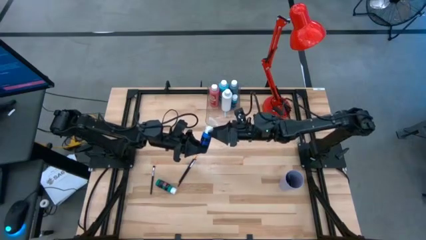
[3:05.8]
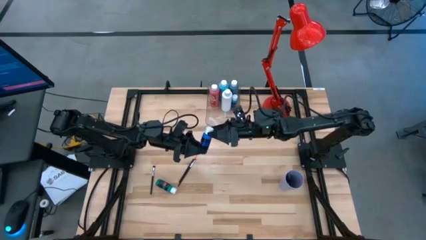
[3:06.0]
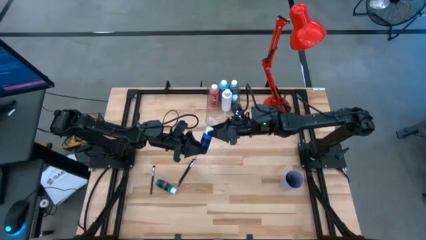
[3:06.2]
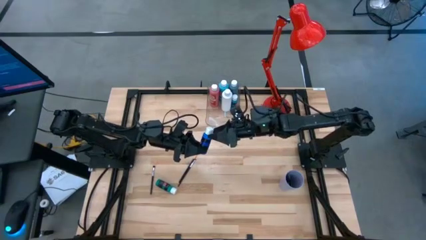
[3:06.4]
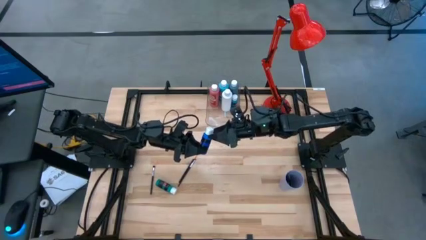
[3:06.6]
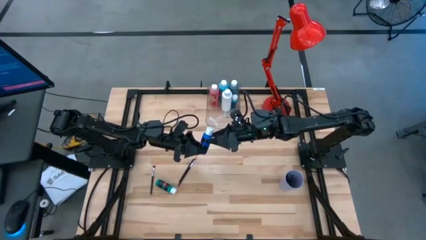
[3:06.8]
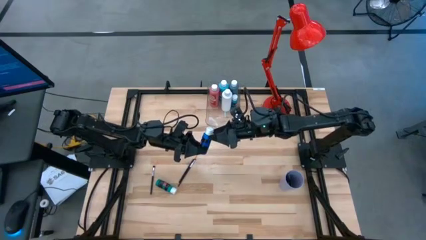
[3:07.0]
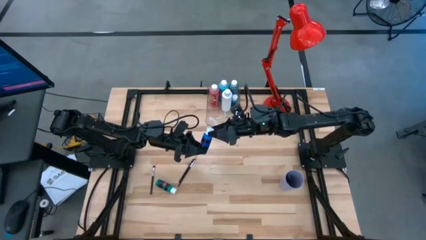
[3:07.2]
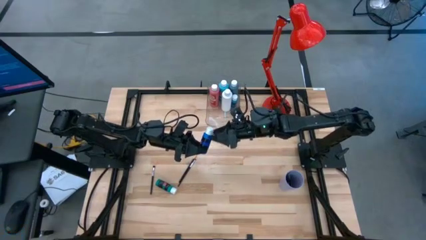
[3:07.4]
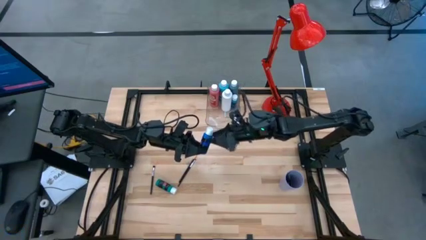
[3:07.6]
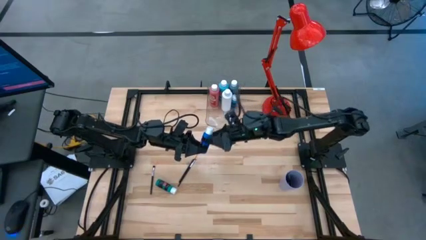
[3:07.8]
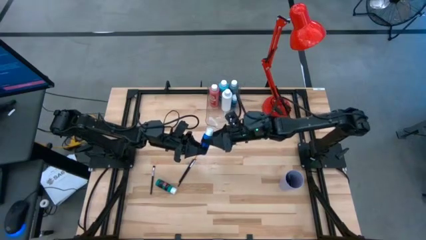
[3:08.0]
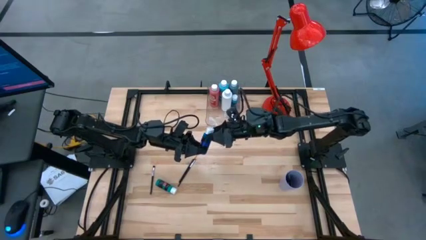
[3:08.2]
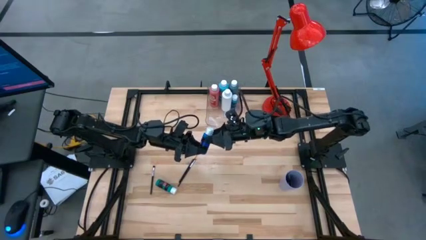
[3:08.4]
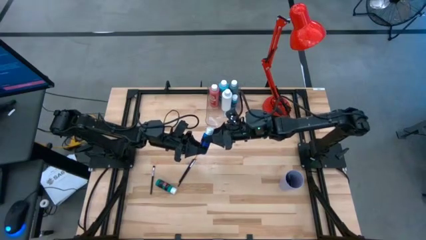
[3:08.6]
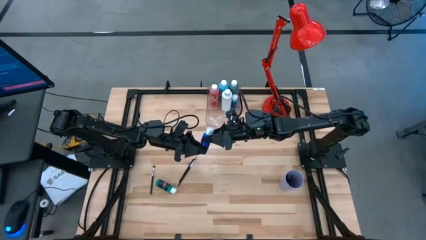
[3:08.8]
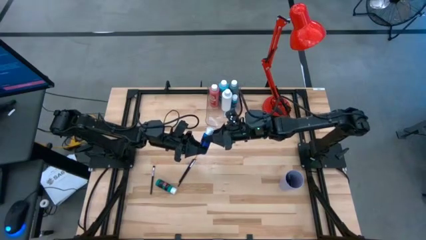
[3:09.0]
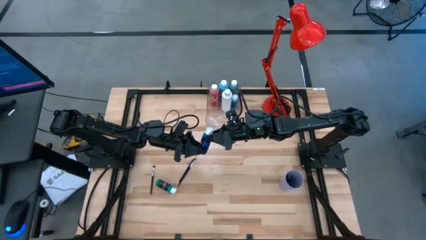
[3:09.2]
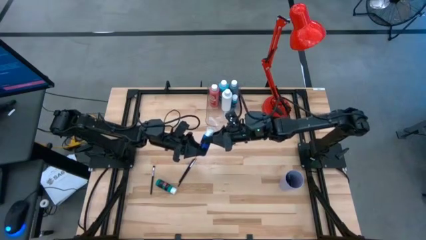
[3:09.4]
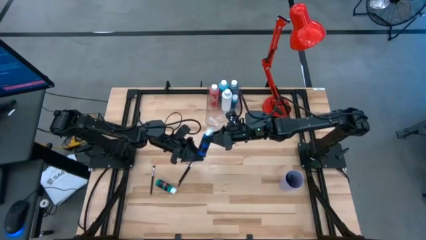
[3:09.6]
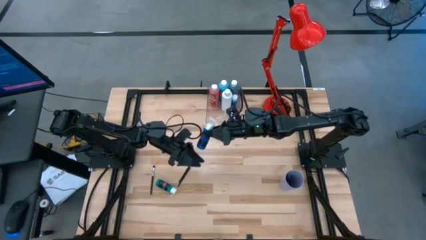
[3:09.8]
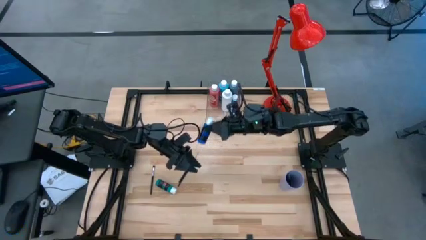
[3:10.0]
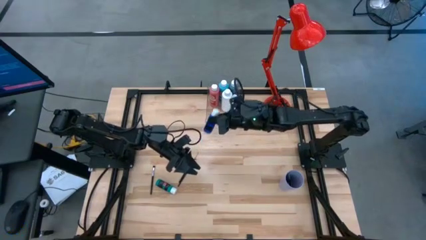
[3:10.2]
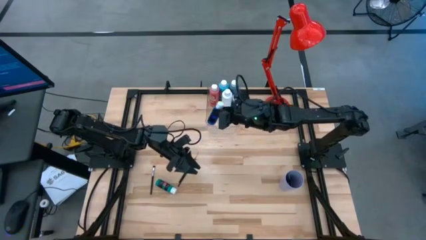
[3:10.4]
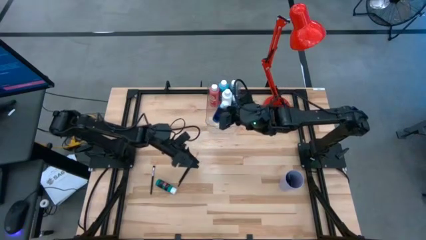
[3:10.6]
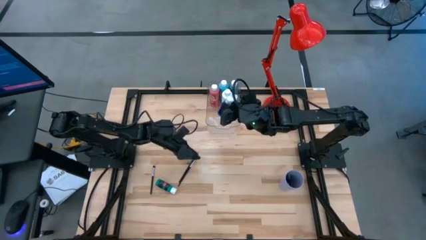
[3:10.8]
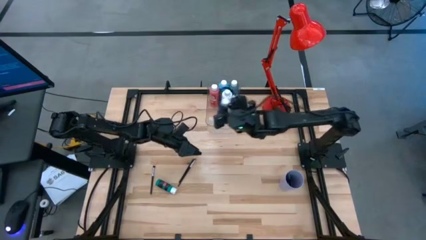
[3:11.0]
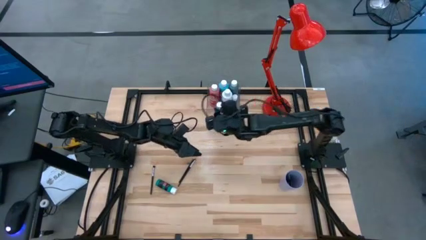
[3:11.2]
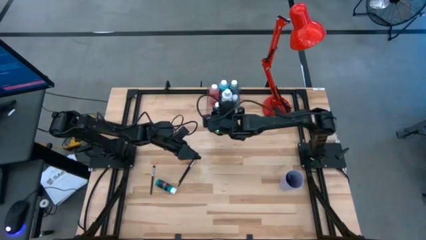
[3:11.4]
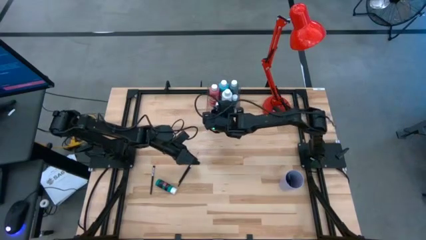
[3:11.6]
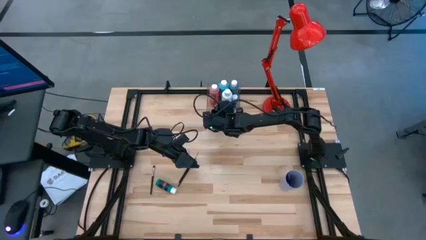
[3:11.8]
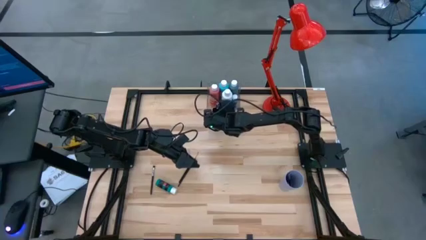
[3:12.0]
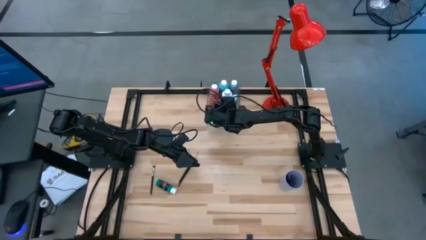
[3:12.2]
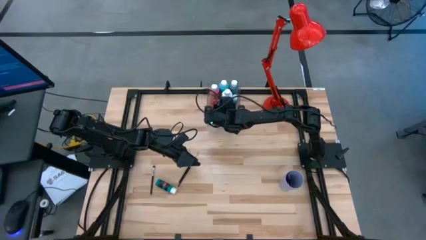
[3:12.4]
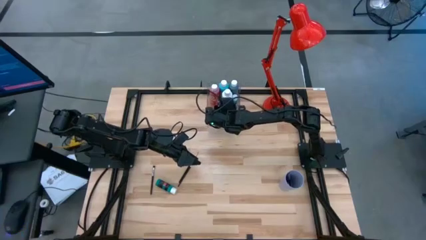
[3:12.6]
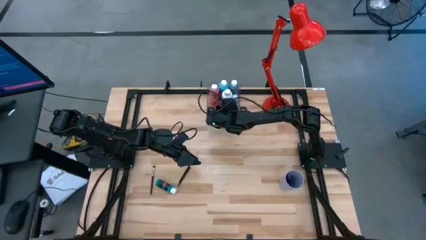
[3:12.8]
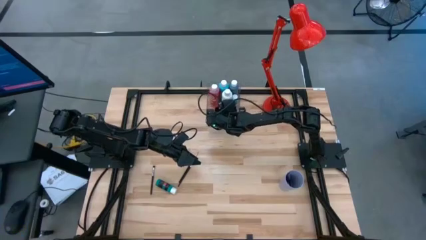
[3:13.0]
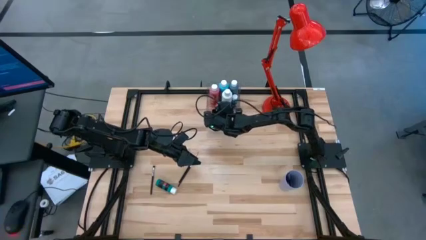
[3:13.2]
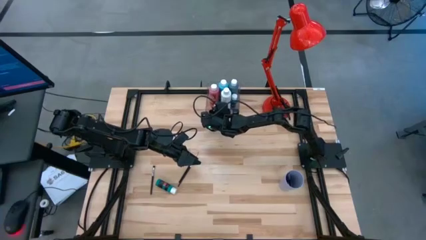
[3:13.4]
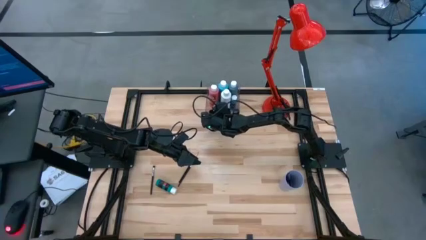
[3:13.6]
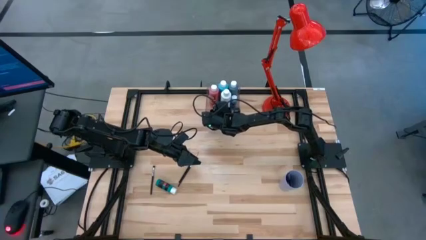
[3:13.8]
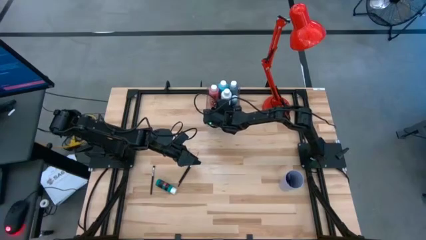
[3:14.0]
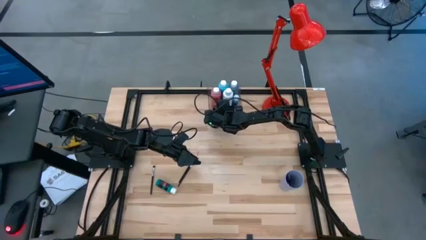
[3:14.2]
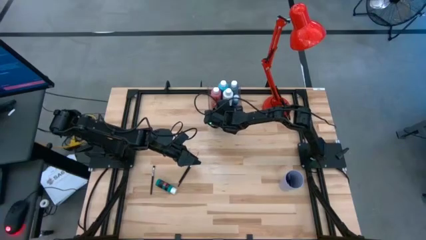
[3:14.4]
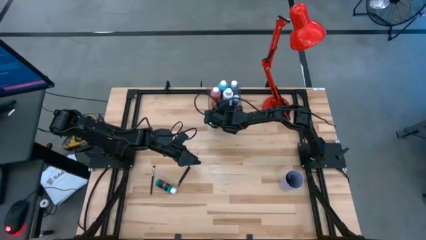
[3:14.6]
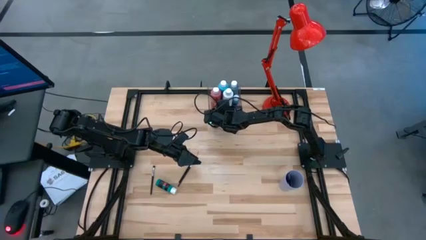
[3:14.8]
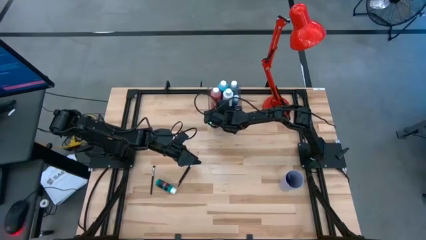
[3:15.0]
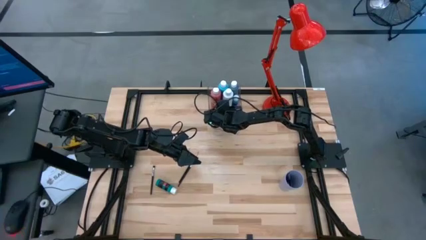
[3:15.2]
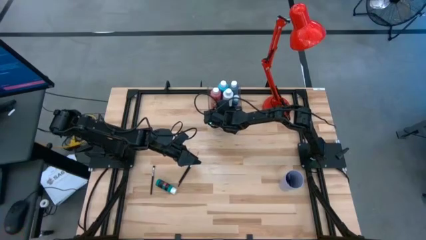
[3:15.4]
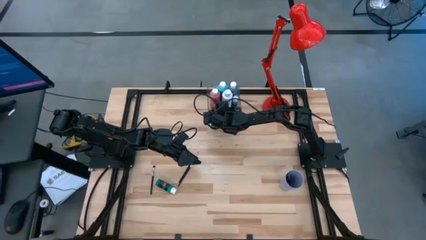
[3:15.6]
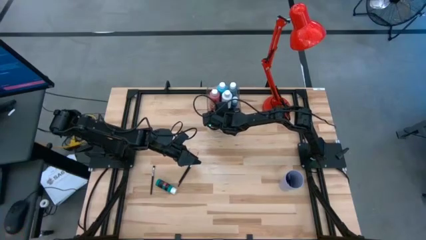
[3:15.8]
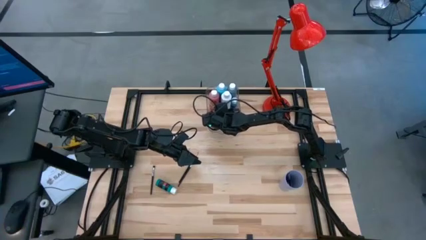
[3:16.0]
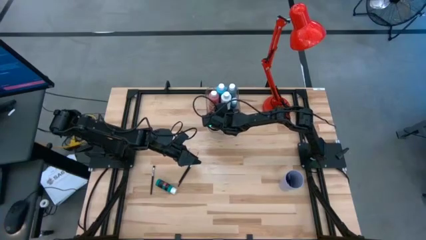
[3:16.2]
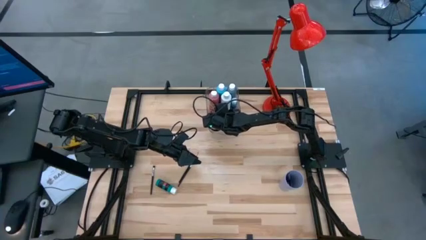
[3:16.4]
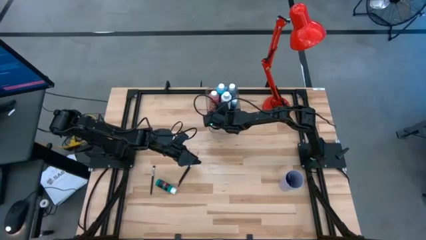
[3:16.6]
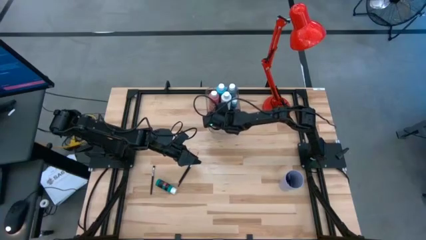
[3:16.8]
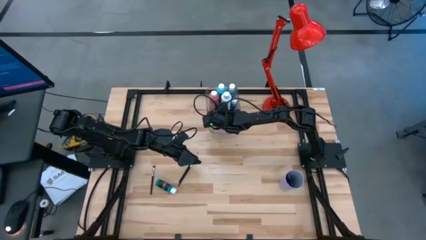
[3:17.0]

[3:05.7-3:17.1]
Task: Pick & Place Paint Supplies
Put the blue paint bottle into the transparent bin

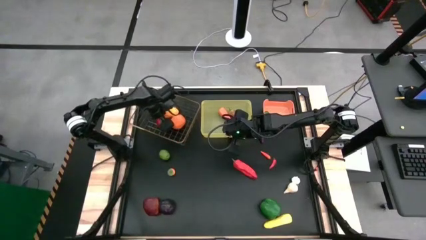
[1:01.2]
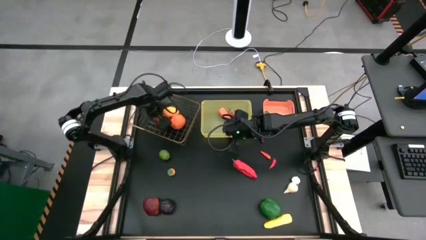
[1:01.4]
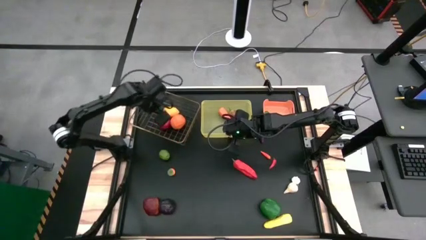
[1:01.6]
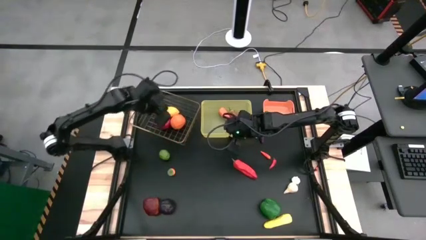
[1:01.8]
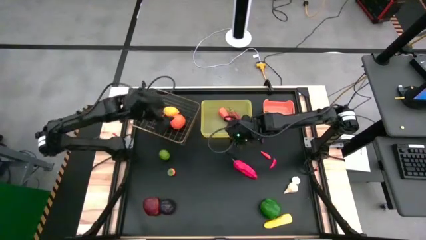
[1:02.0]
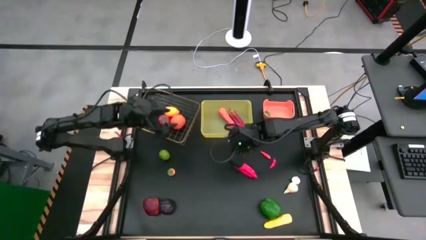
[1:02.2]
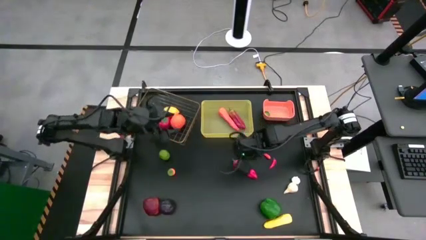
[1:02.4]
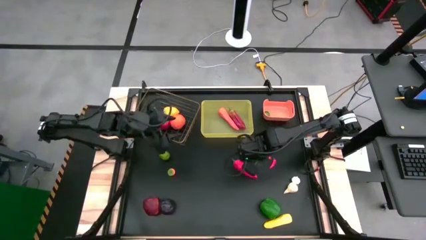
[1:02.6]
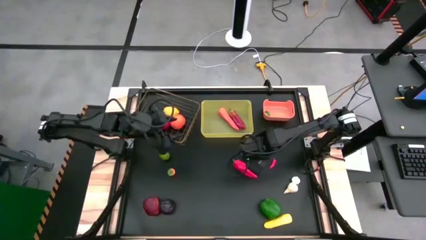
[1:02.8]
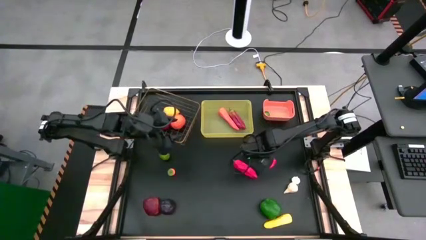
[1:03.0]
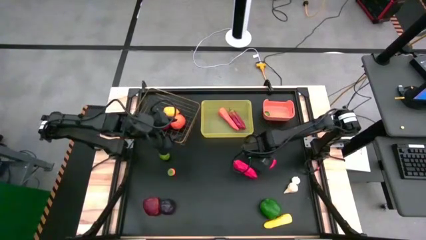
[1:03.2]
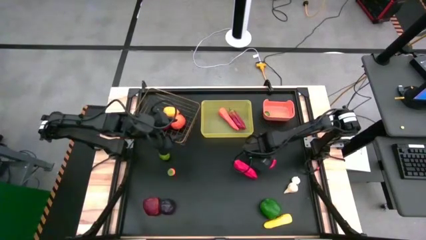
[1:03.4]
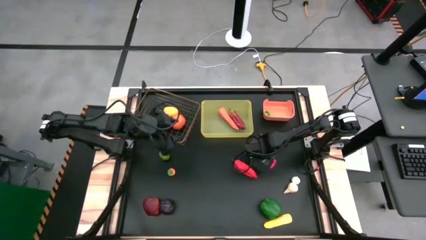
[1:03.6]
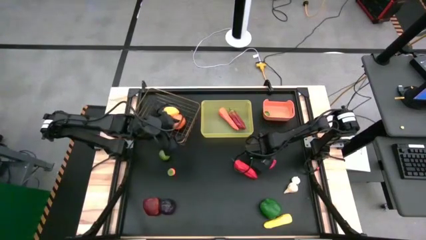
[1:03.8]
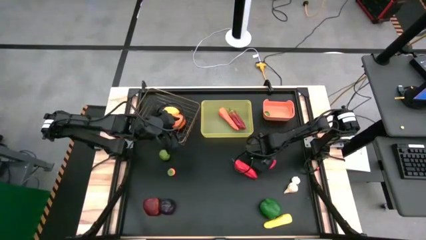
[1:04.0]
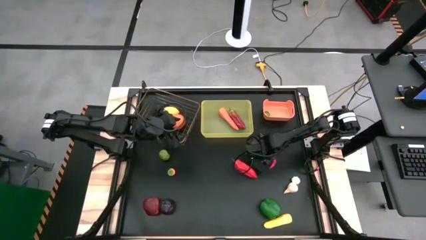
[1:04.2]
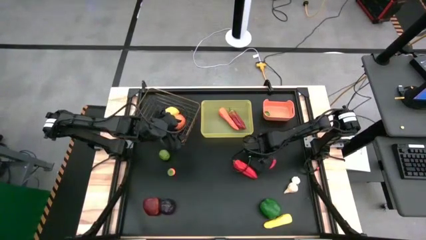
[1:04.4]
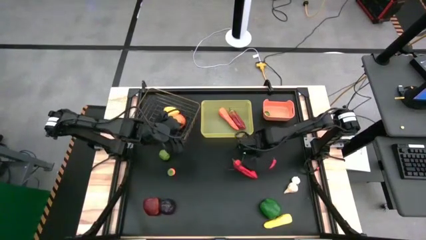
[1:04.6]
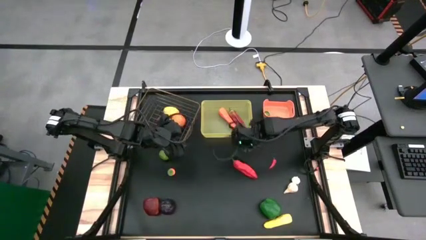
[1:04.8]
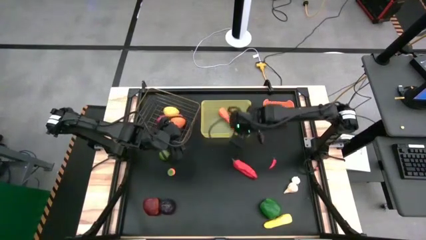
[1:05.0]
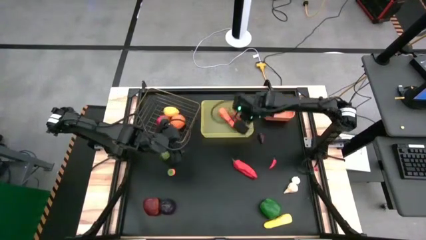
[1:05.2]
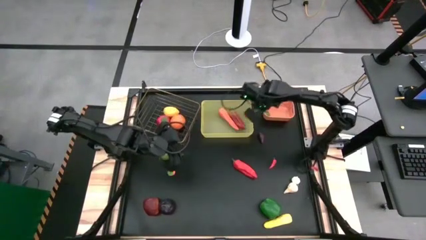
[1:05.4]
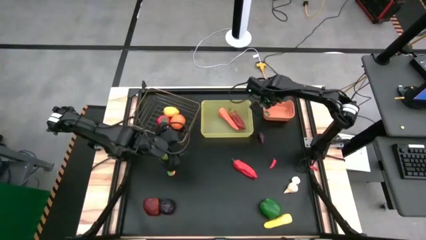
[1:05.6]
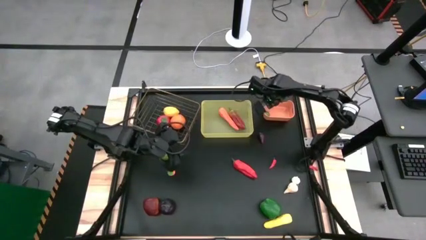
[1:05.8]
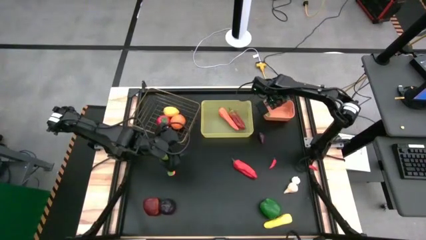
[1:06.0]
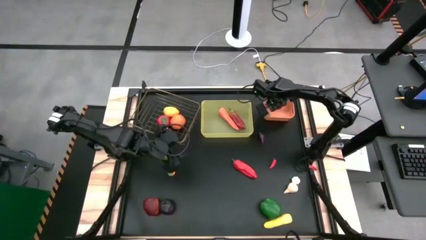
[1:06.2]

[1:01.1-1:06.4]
Task: Sort produce into baskets
Put the orange chili pepper into the orange bin
